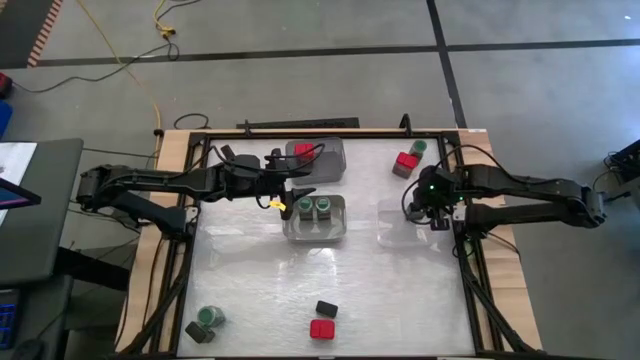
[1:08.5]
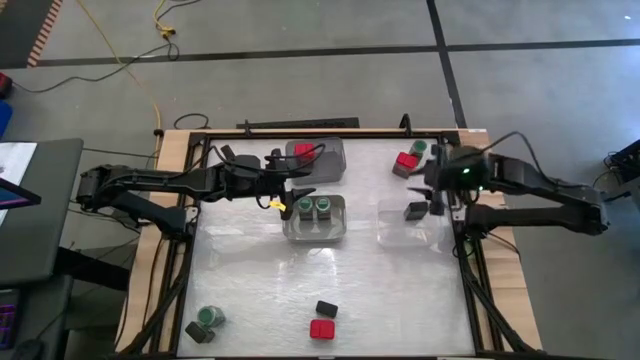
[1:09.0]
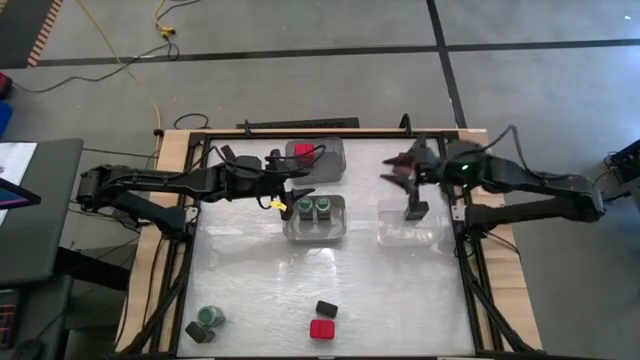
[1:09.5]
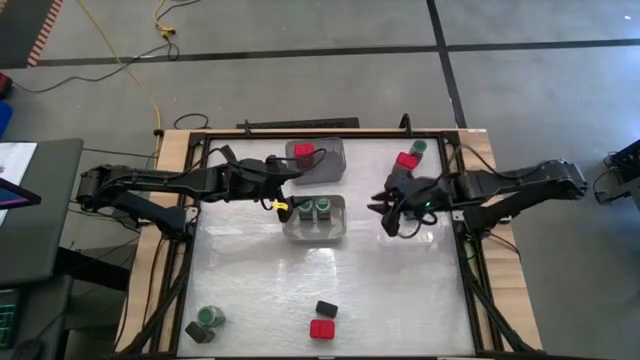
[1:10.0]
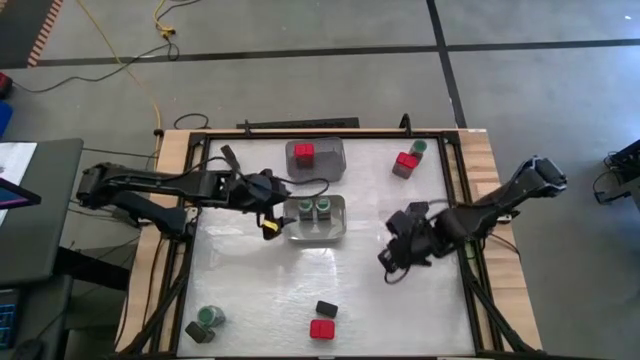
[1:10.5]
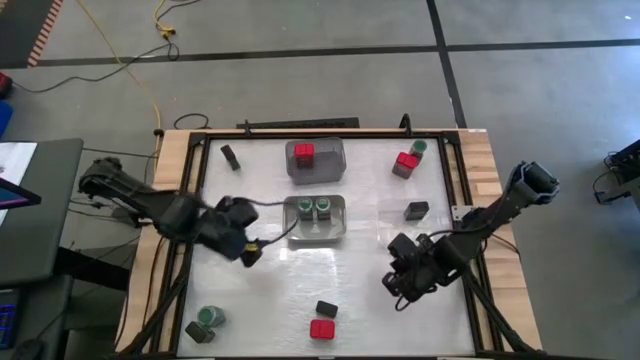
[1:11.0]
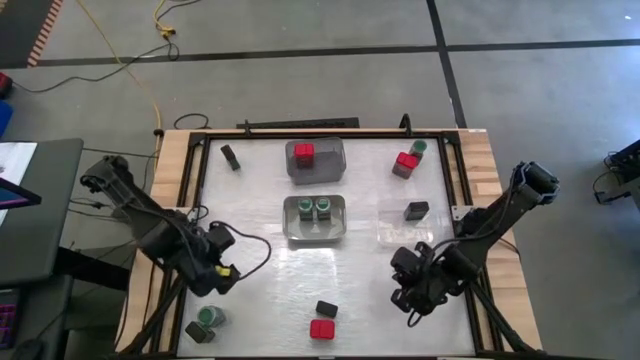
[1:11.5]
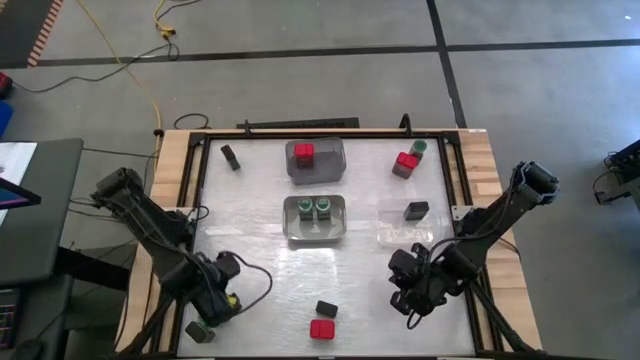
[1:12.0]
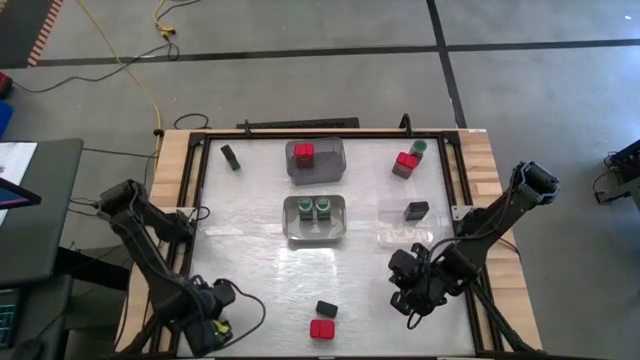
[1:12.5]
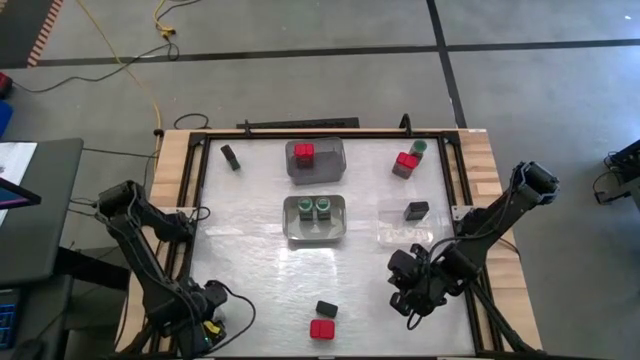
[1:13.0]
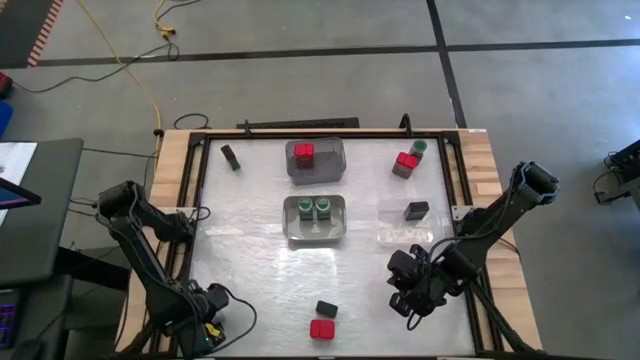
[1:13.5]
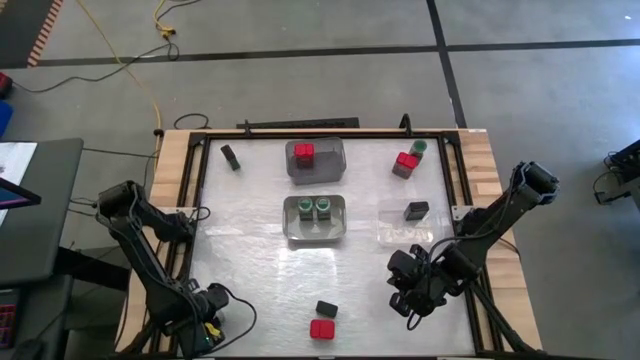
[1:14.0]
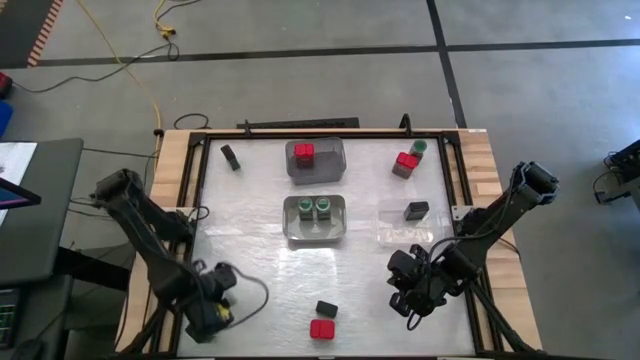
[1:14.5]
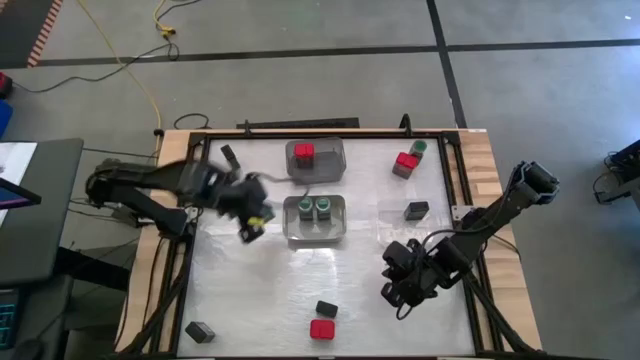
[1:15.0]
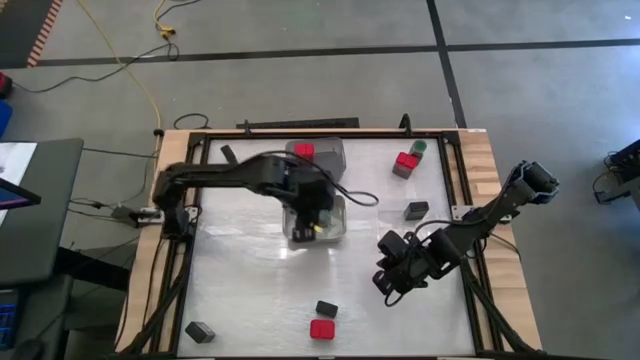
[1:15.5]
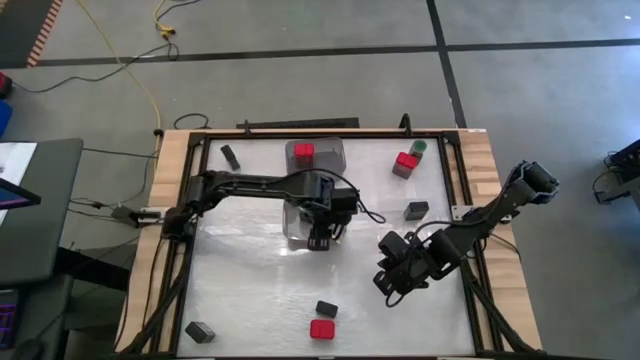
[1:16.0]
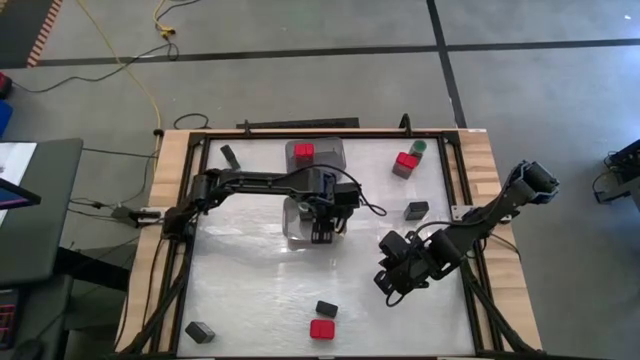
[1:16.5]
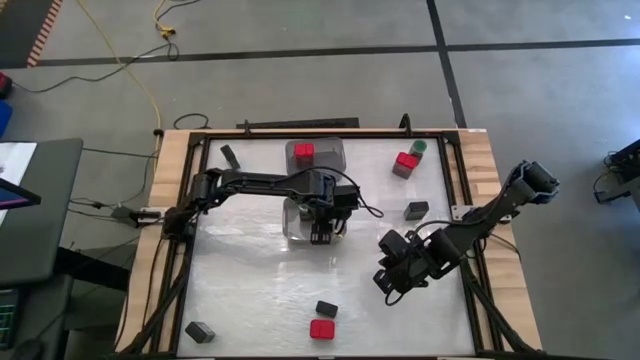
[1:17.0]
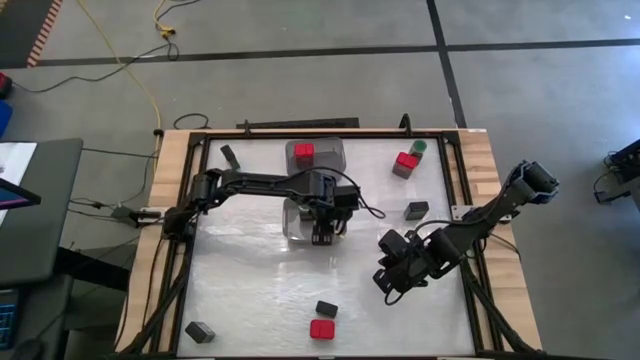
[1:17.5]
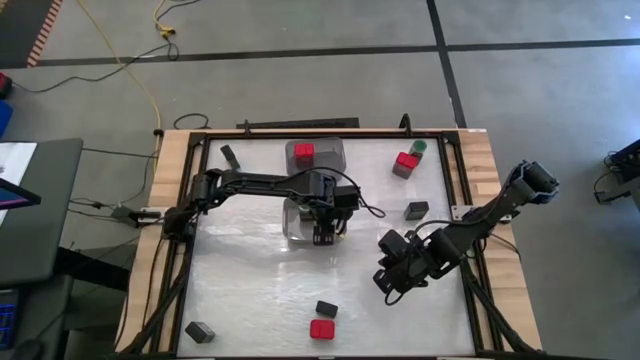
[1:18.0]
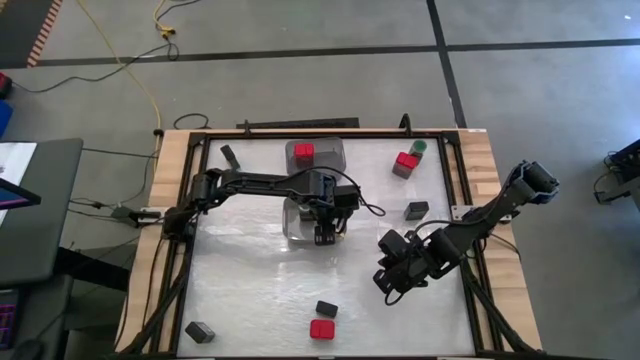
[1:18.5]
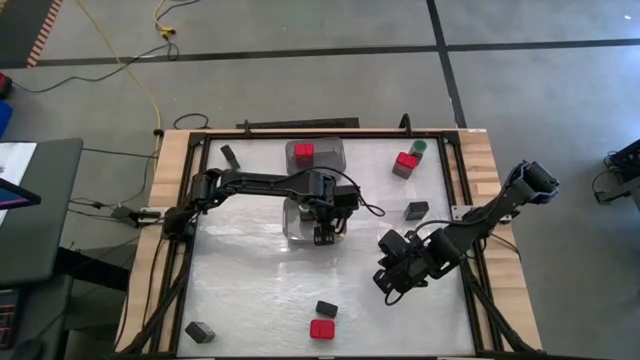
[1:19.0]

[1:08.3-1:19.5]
Task: Sort spices by type
Put the green spice bottle into the gray bin

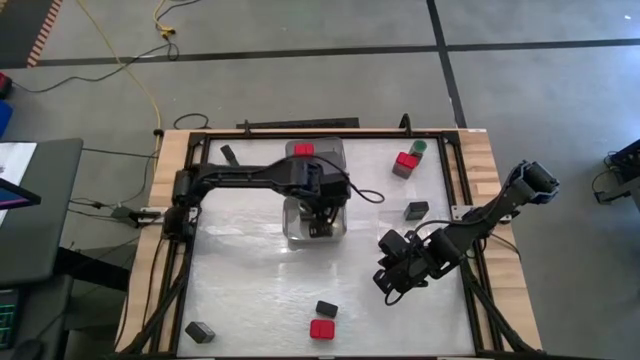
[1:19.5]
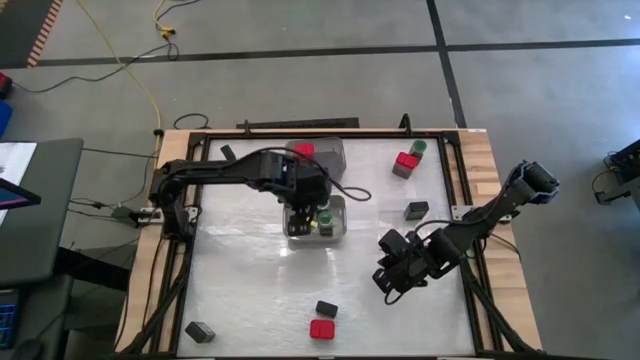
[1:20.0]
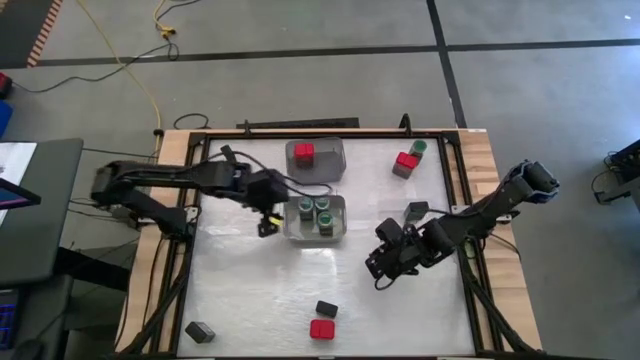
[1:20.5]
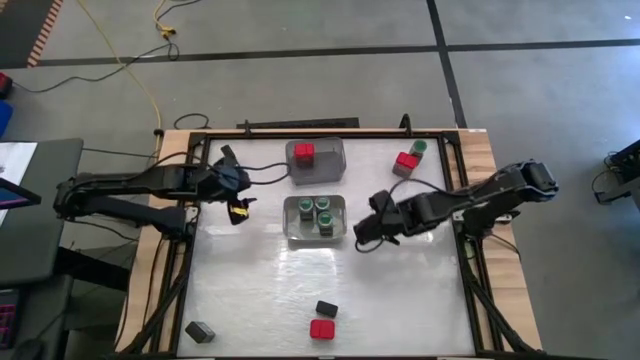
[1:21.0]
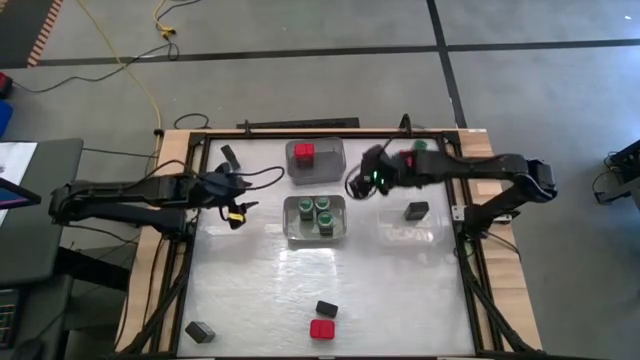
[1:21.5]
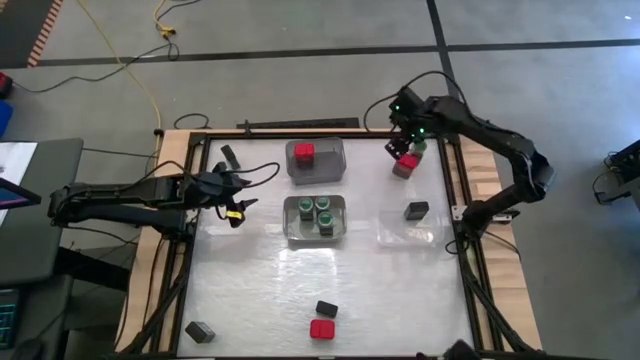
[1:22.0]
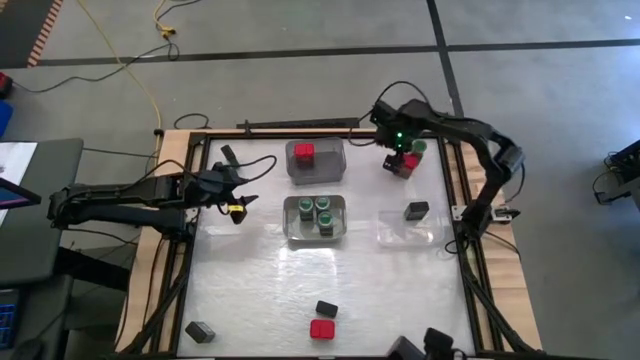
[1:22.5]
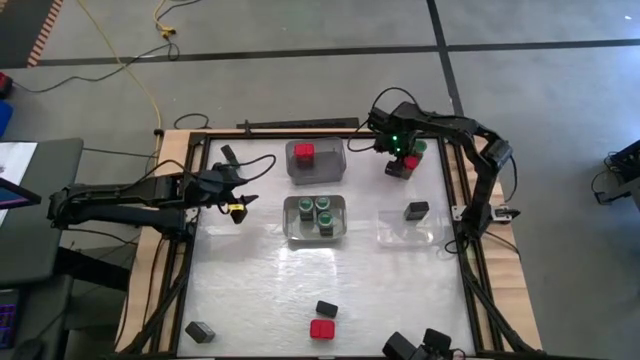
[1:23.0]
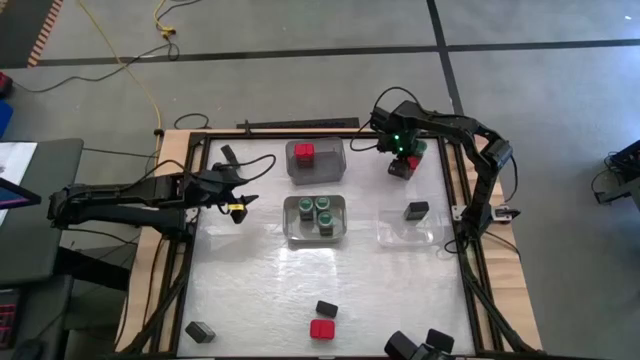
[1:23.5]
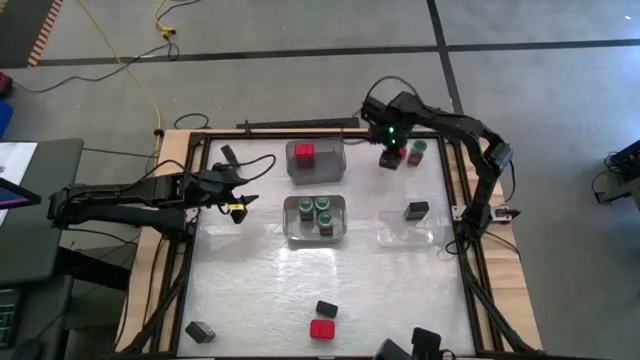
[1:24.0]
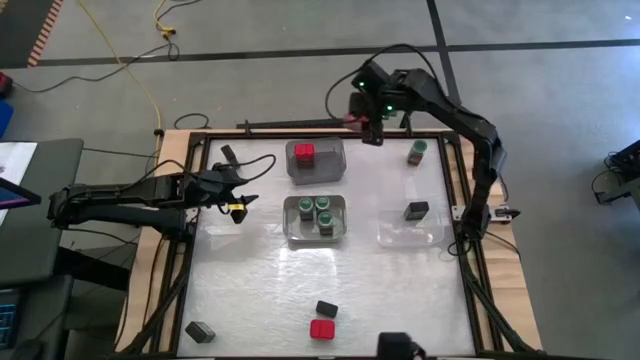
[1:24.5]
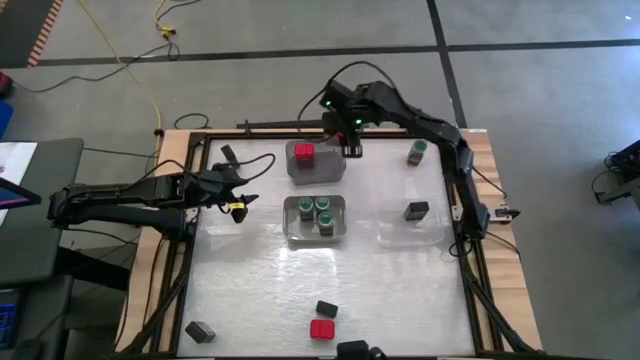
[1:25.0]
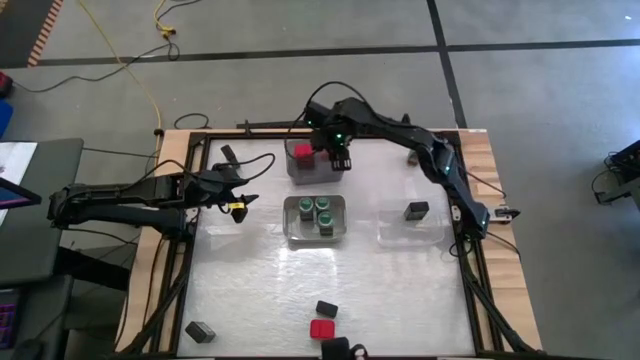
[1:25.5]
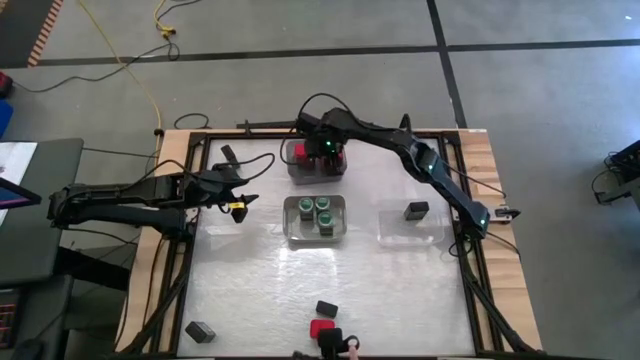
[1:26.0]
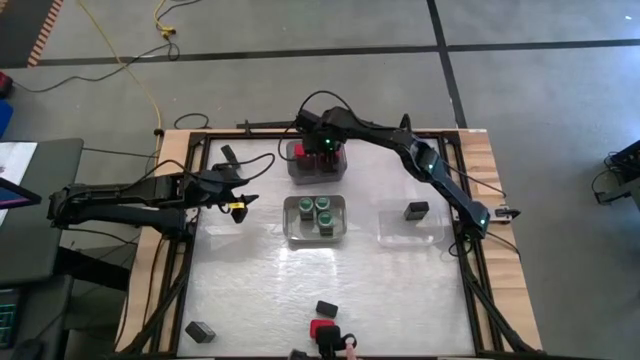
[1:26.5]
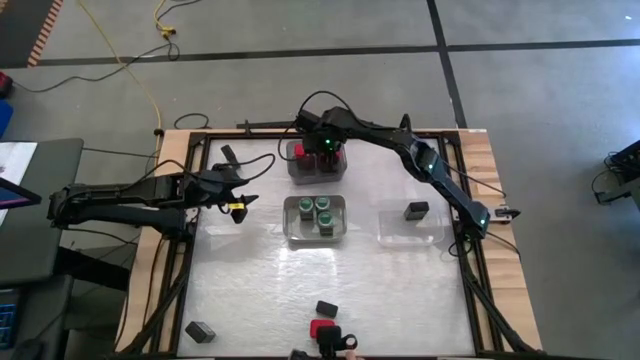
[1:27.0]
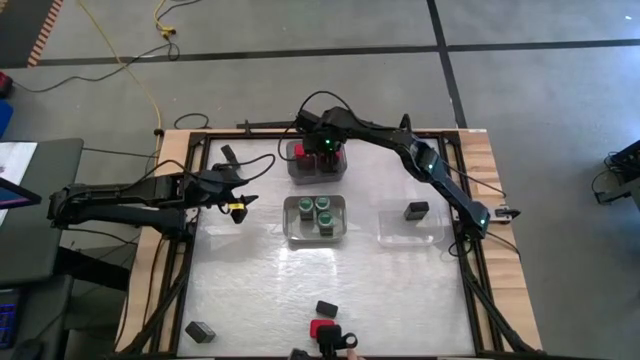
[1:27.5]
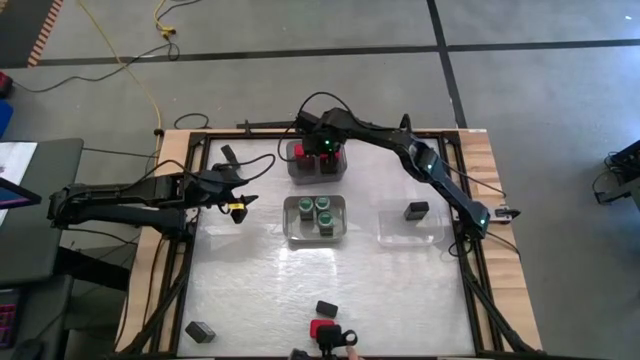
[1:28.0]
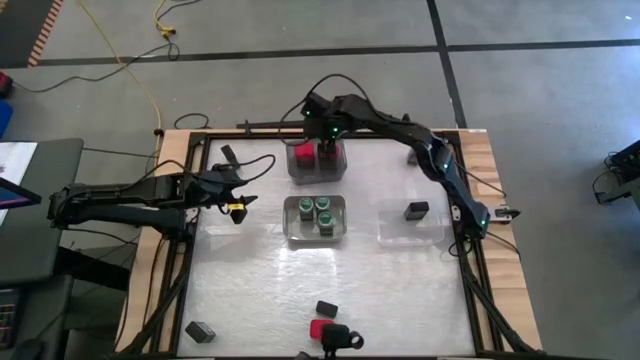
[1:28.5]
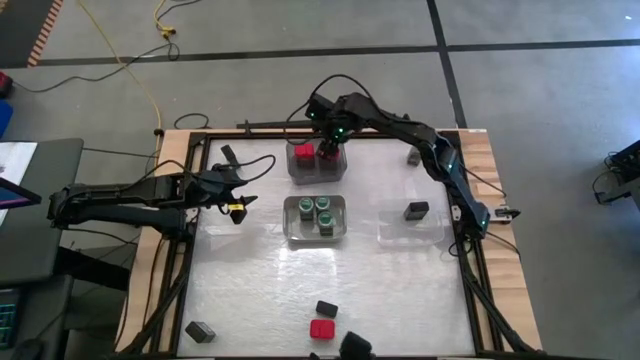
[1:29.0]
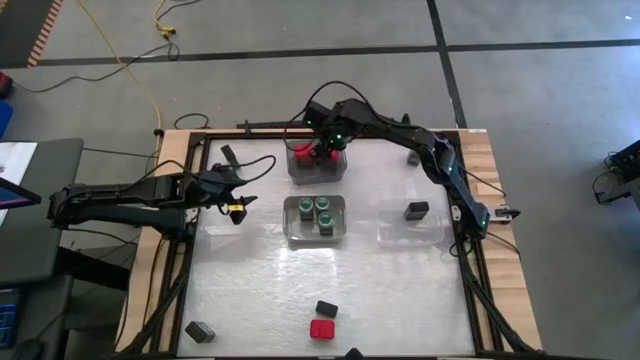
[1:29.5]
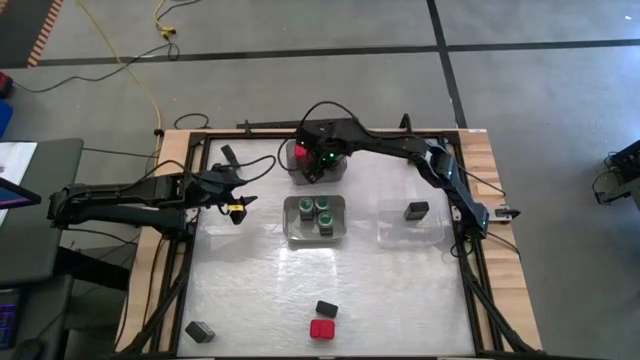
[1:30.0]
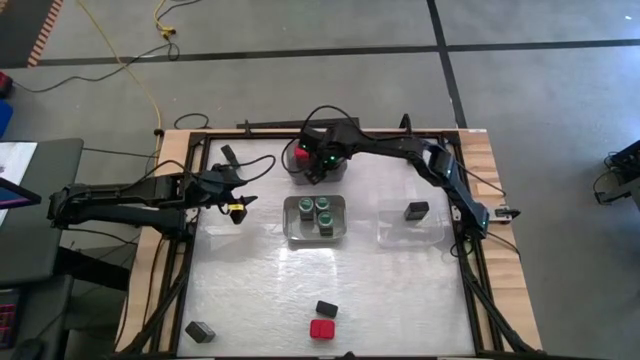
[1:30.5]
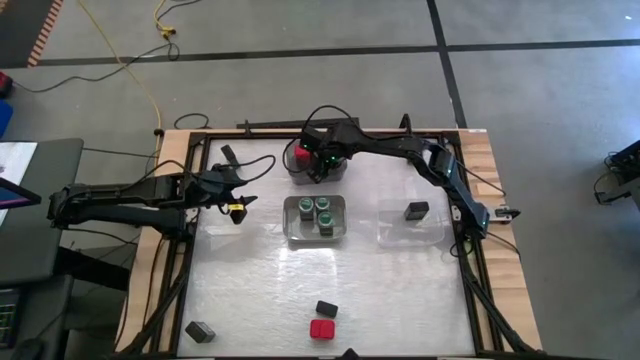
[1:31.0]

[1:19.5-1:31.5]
Put the red spice can into the black bin
